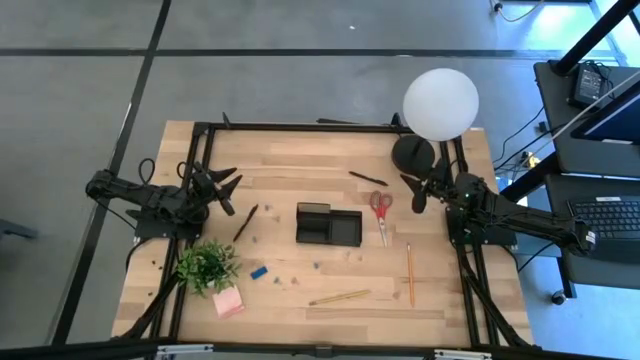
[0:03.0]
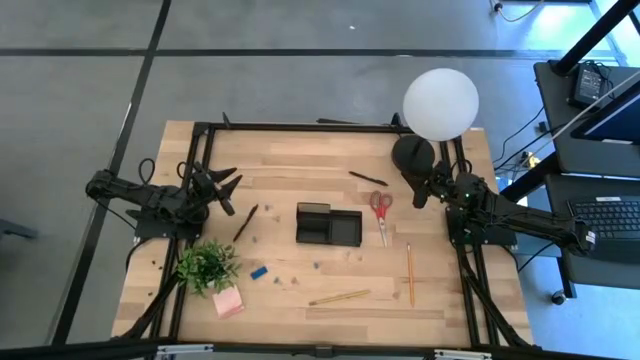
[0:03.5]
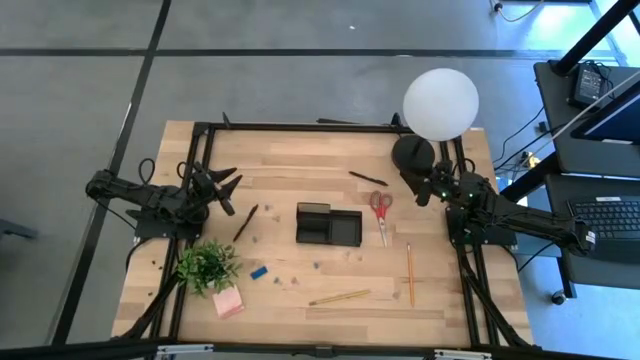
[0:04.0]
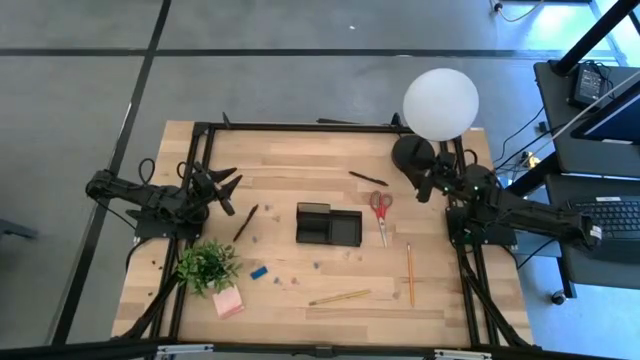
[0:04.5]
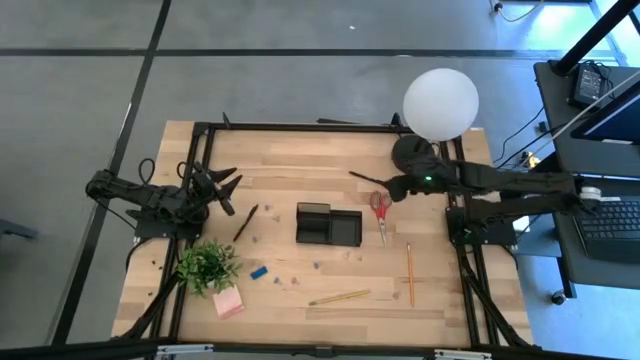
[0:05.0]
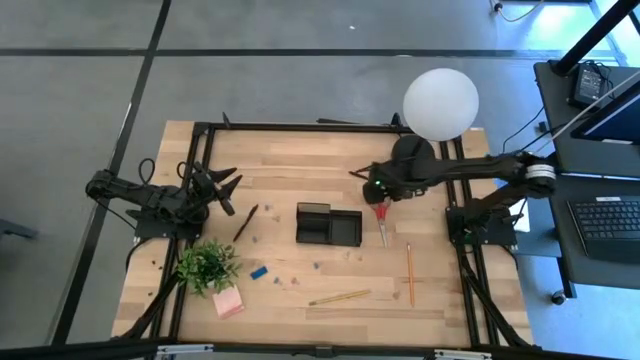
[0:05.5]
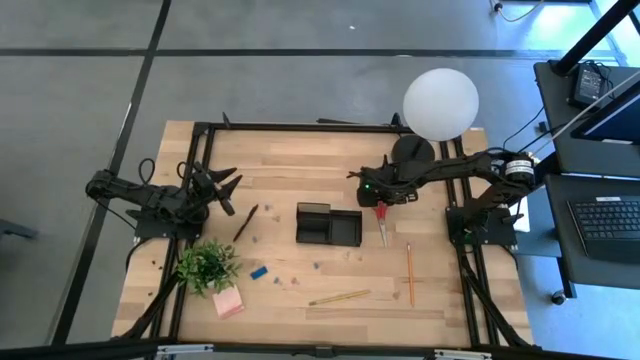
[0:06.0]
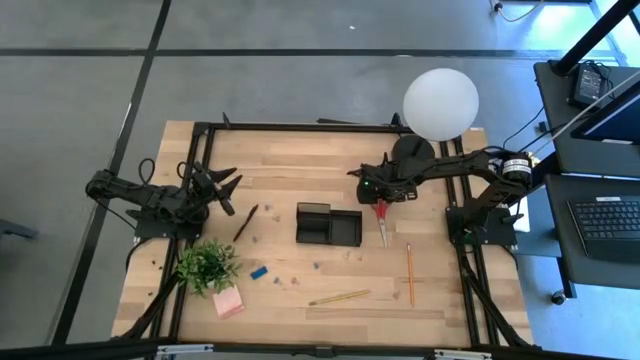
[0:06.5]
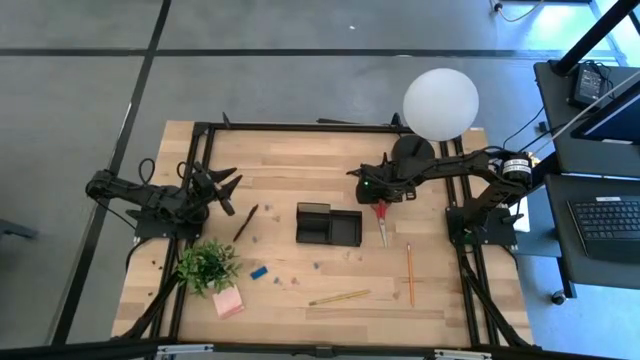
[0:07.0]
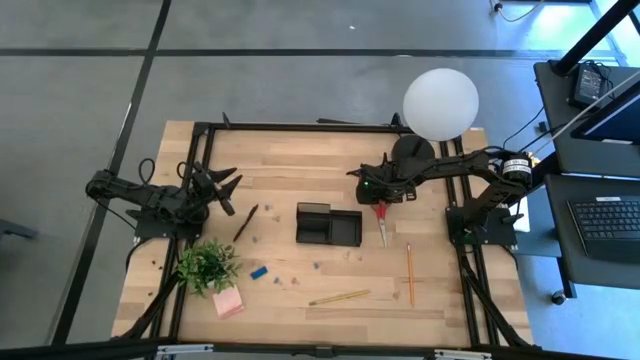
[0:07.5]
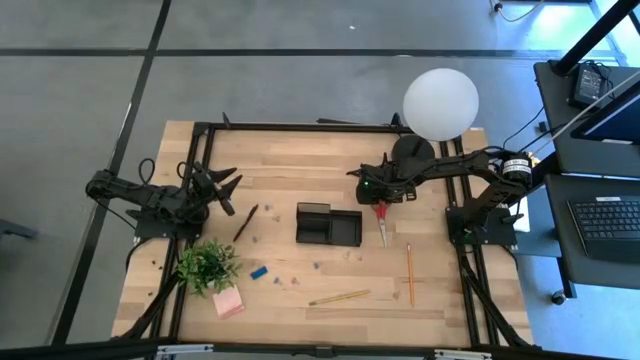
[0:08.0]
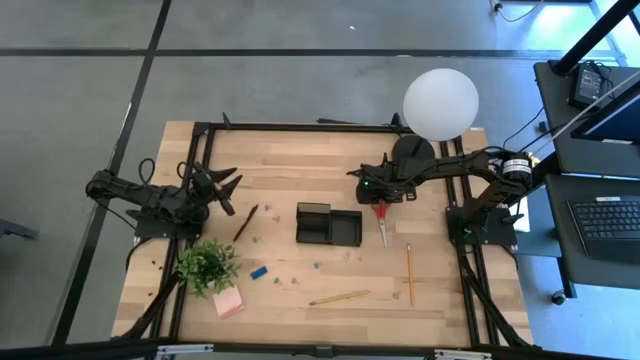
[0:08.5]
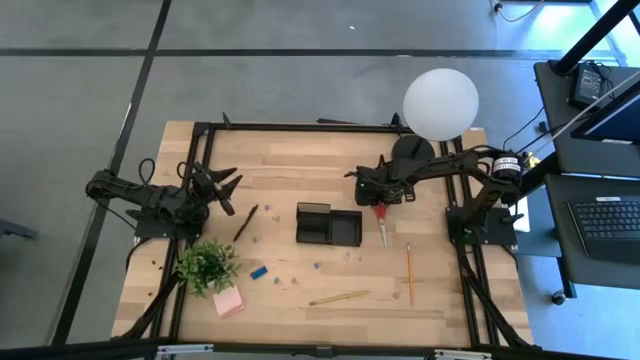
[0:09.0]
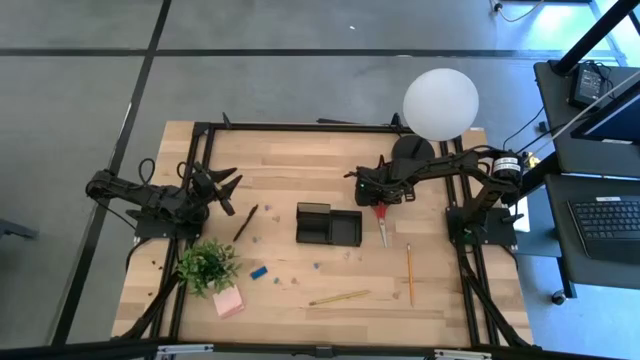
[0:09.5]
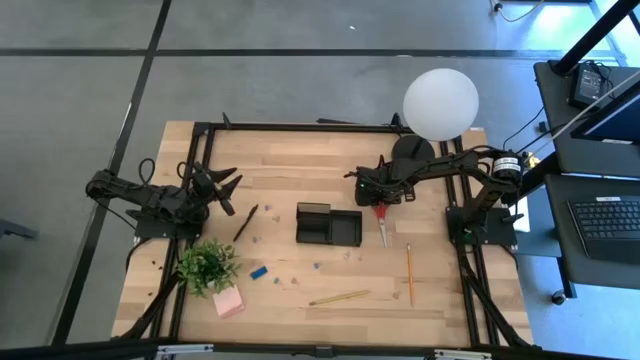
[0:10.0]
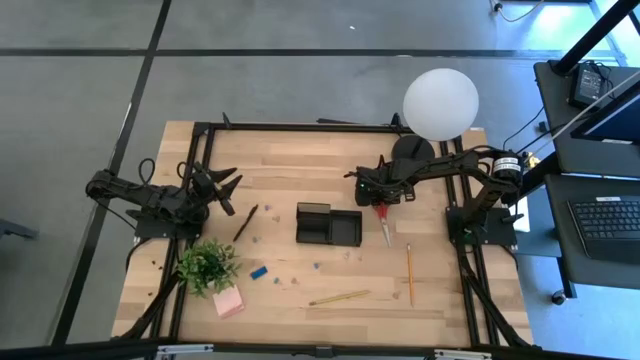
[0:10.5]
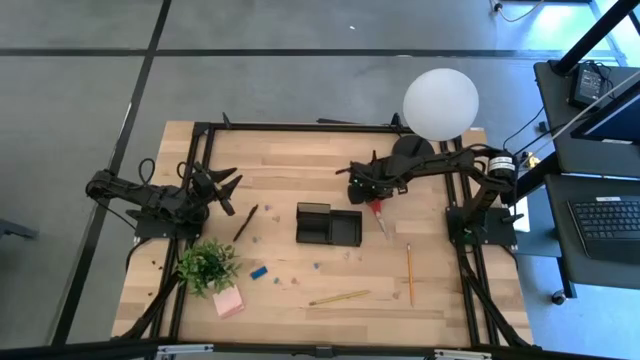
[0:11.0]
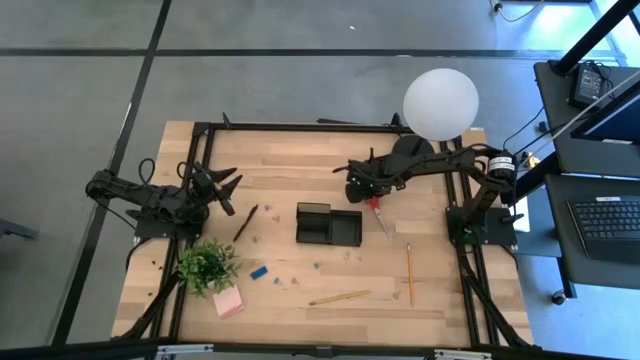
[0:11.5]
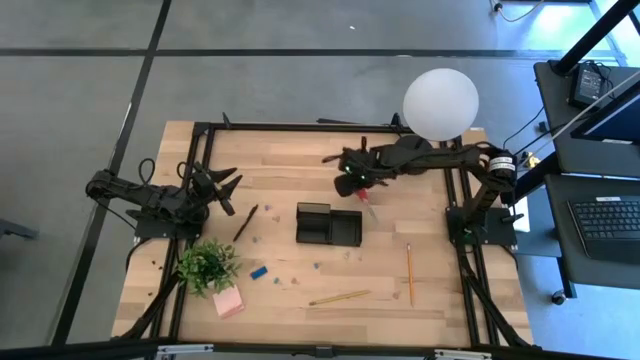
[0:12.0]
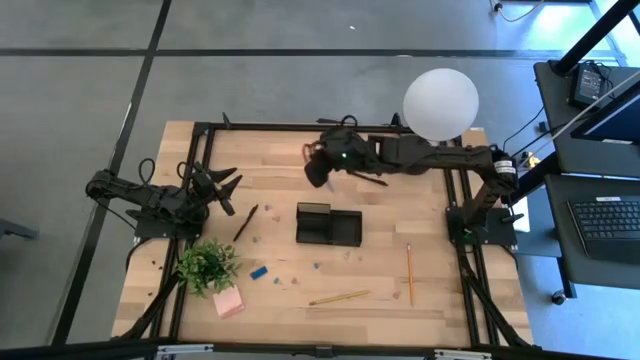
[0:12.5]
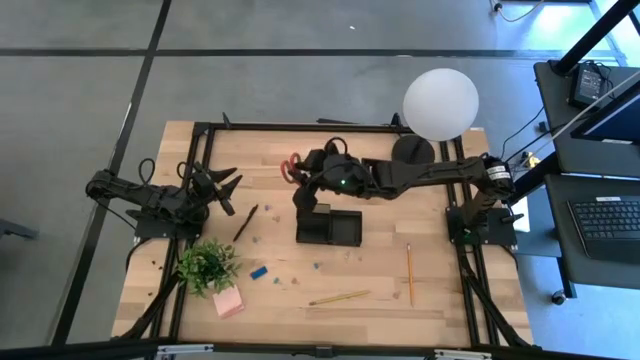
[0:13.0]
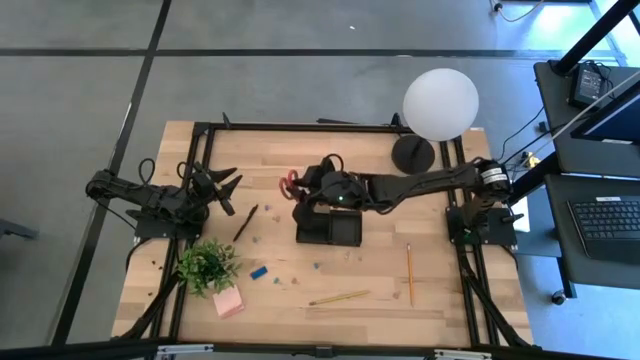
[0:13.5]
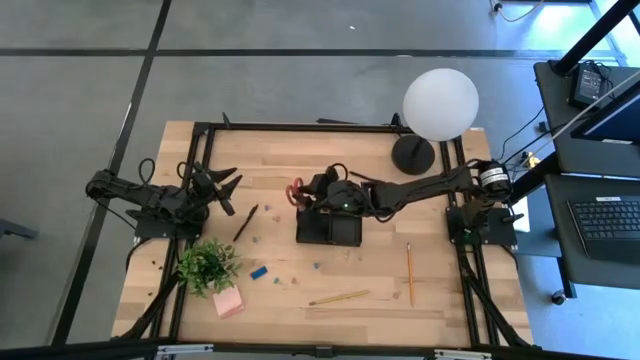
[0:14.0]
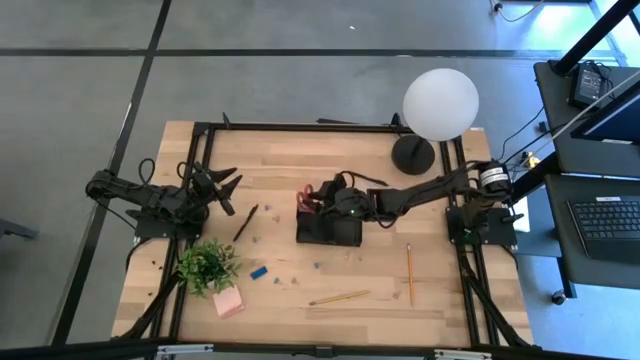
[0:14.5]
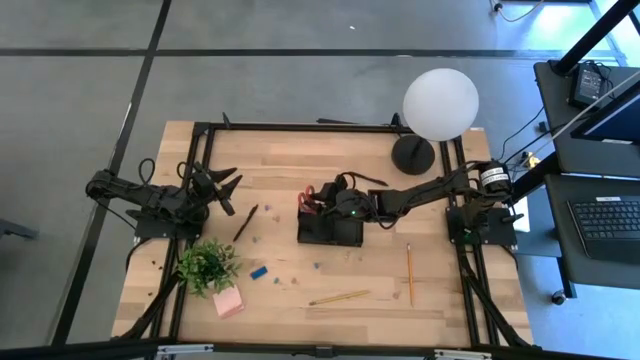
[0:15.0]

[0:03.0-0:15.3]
Task: Pick and place office supplies into organizer
Put the orange scissors into the black desk organizer

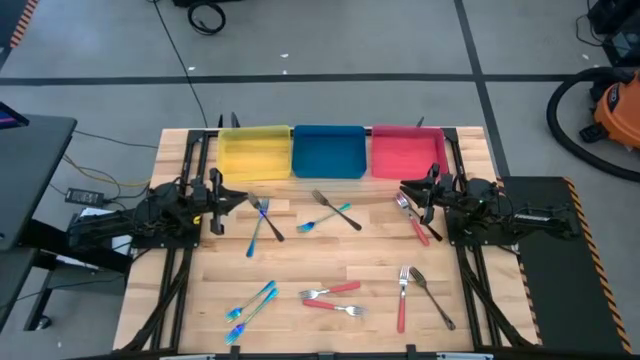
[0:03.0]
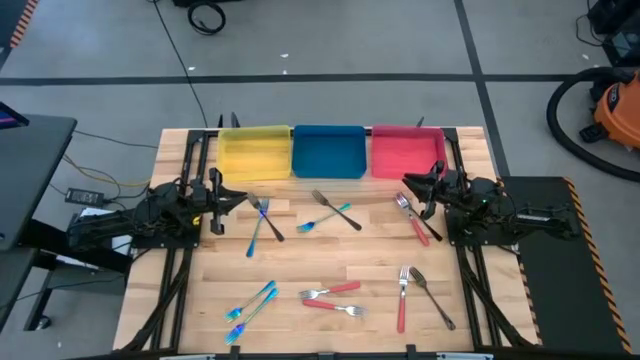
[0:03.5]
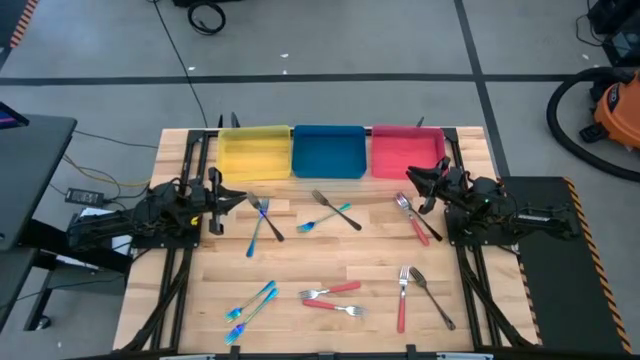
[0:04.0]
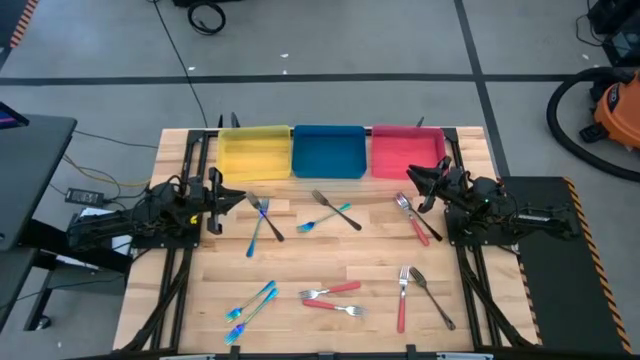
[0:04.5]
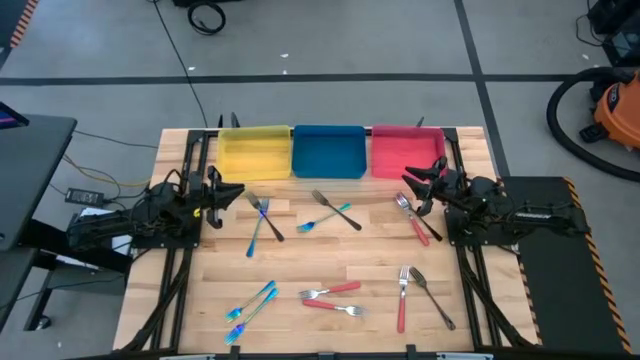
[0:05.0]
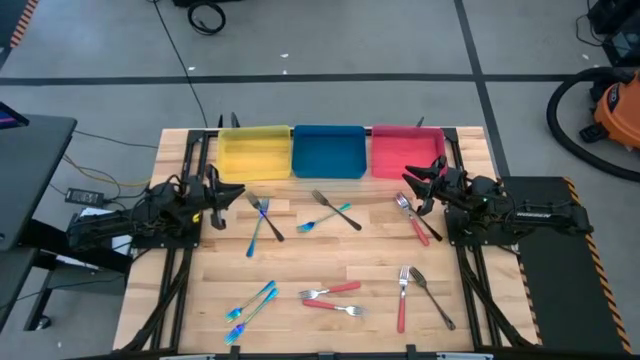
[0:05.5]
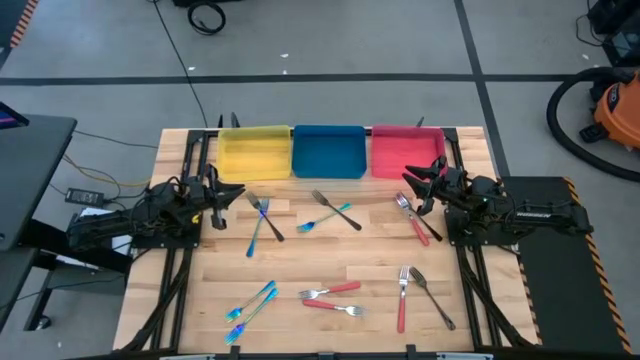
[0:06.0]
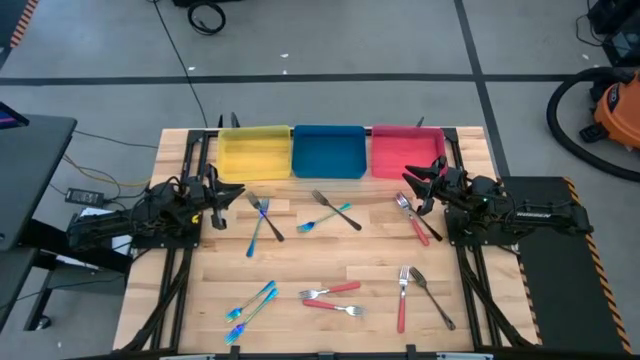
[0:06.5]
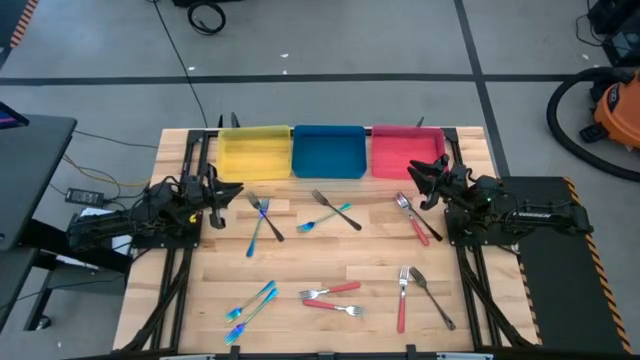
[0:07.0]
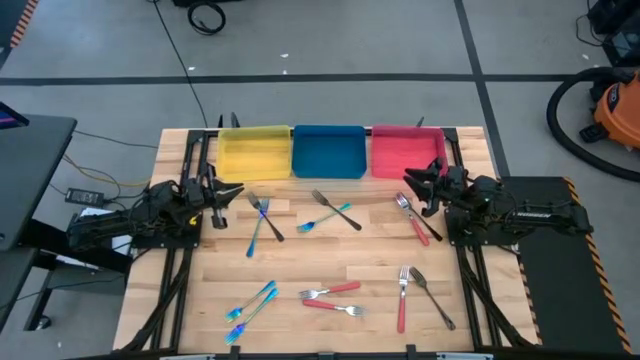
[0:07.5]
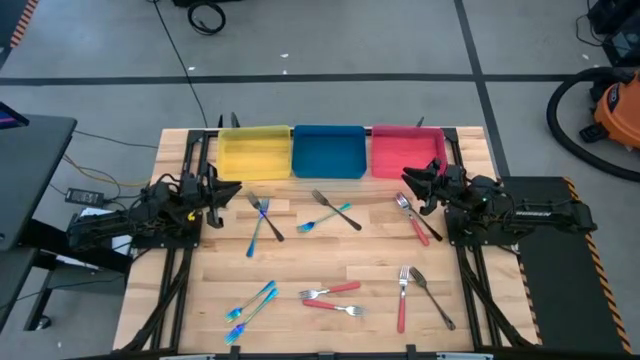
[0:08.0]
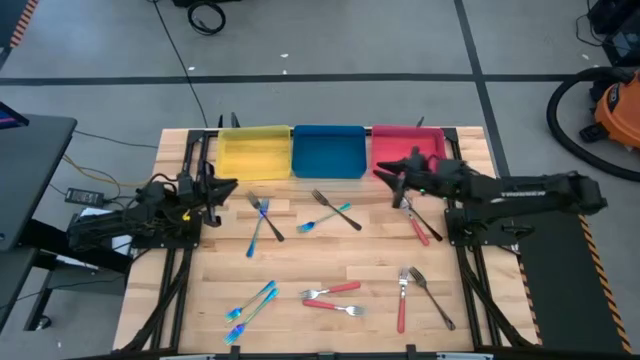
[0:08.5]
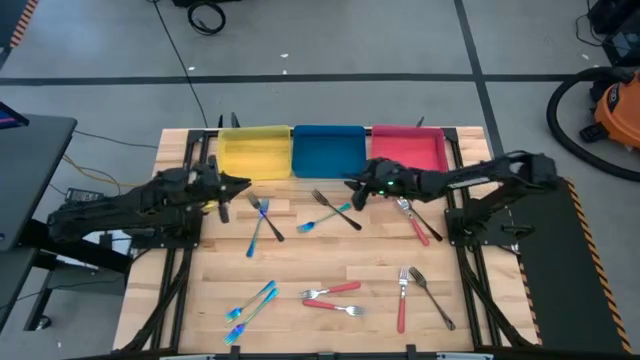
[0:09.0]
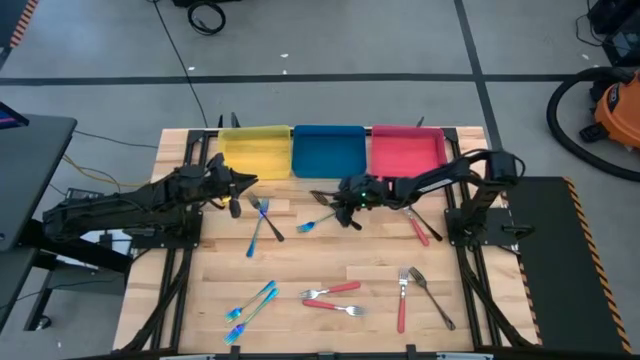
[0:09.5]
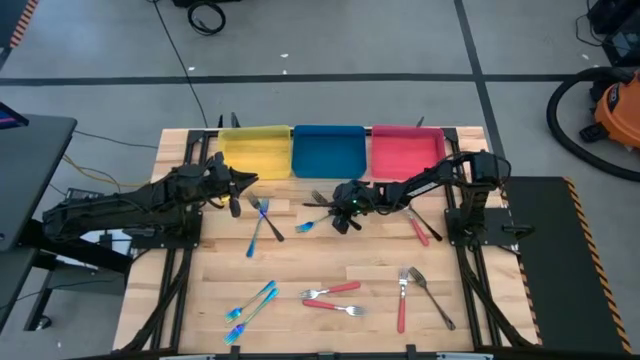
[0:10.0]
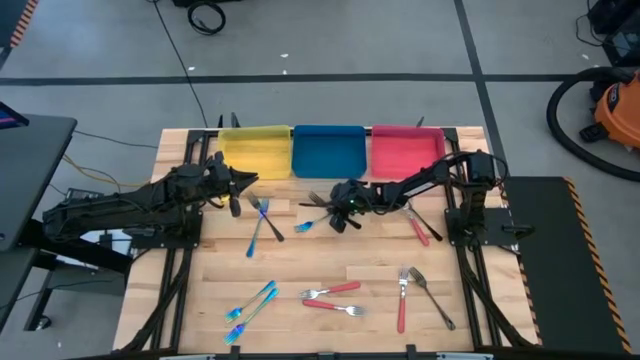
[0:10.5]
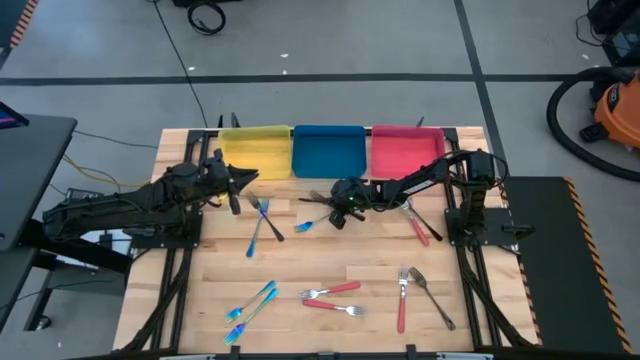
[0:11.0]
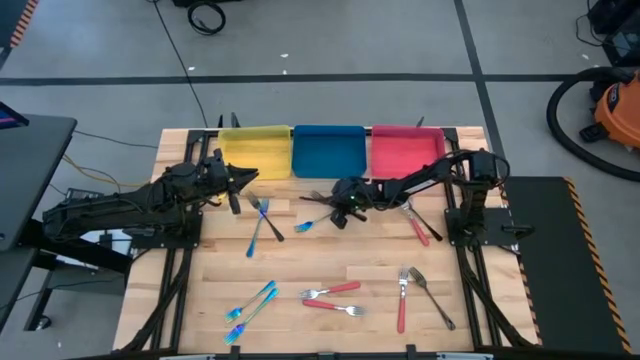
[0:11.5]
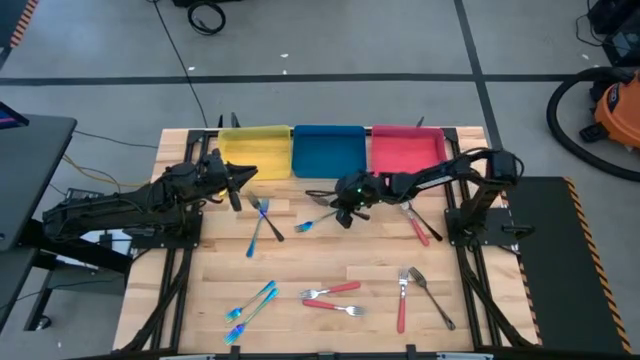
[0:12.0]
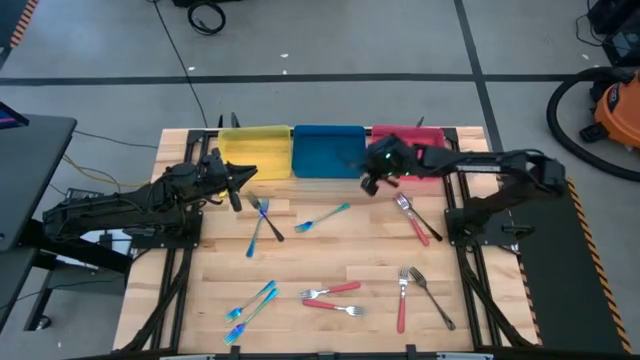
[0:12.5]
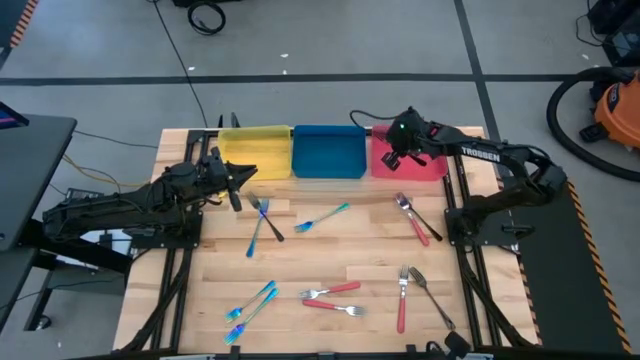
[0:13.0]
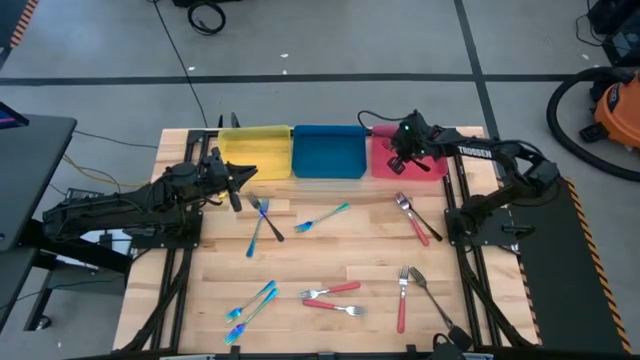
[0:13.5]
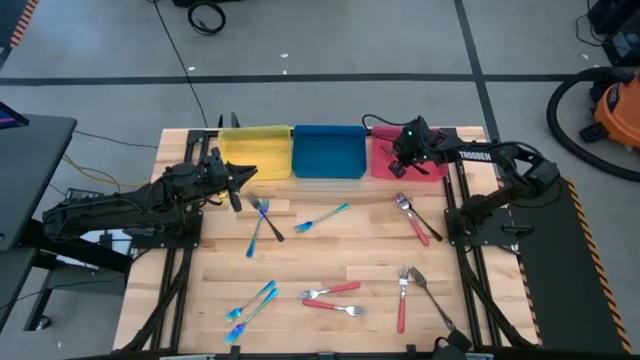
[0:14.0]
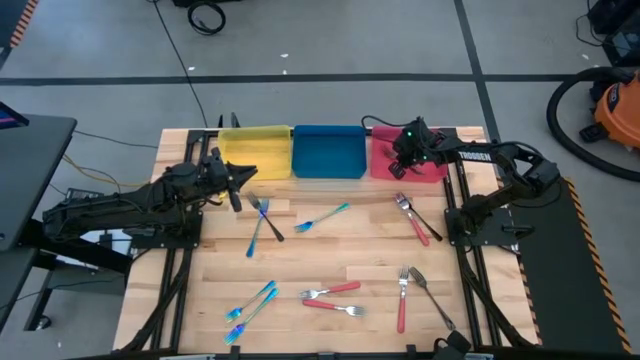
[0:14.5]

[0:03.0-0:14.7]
Task: Sort silverware by color (type)
Put the black fork into the pink bin
